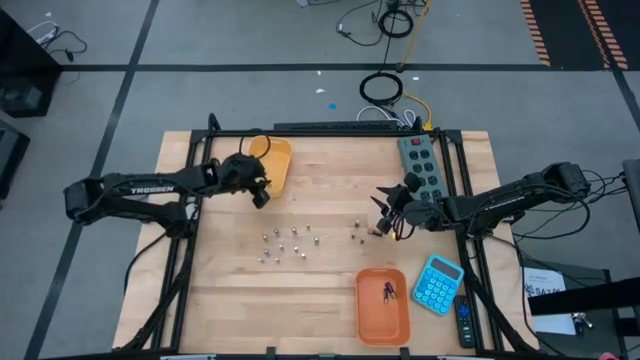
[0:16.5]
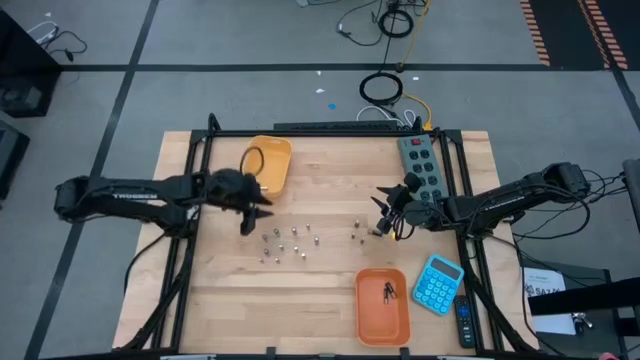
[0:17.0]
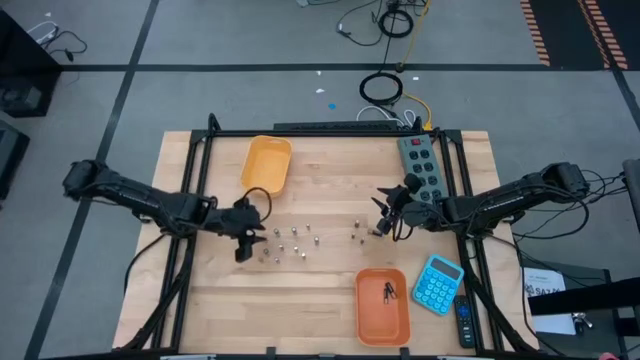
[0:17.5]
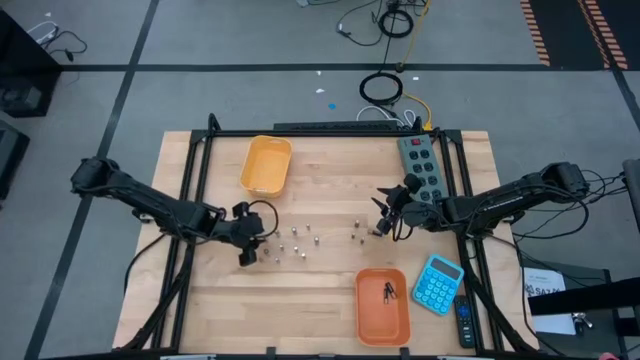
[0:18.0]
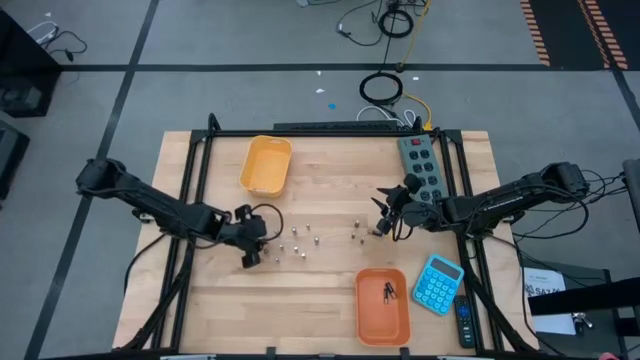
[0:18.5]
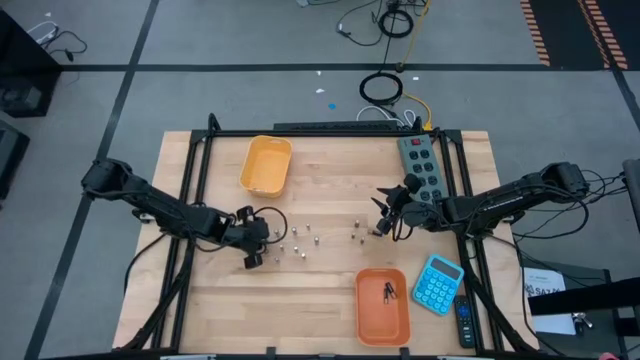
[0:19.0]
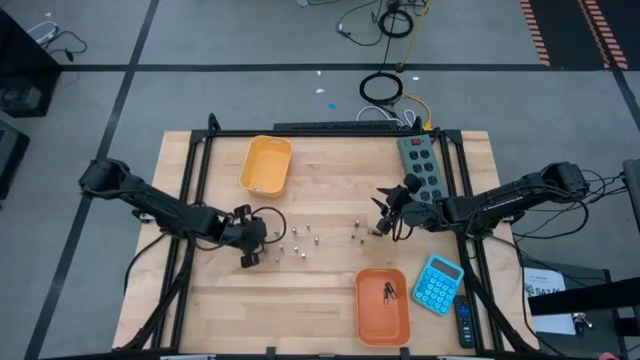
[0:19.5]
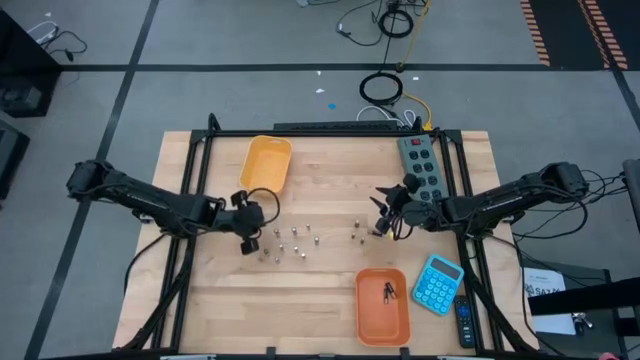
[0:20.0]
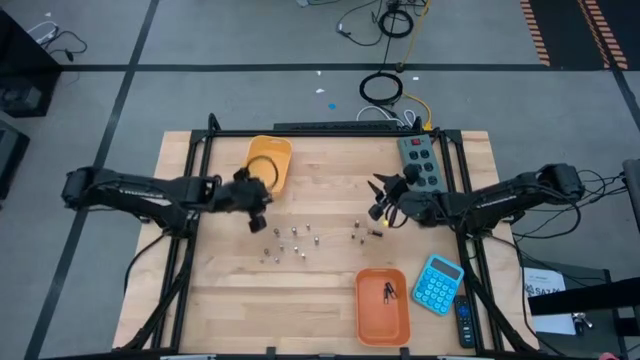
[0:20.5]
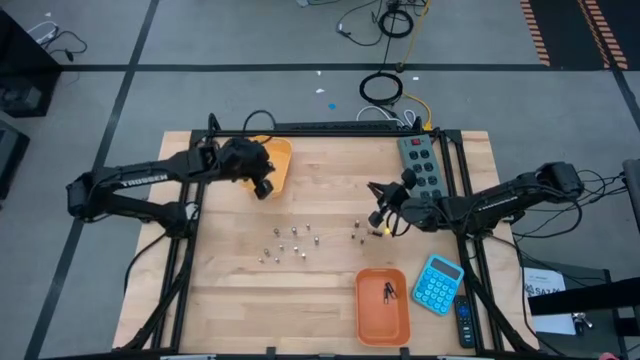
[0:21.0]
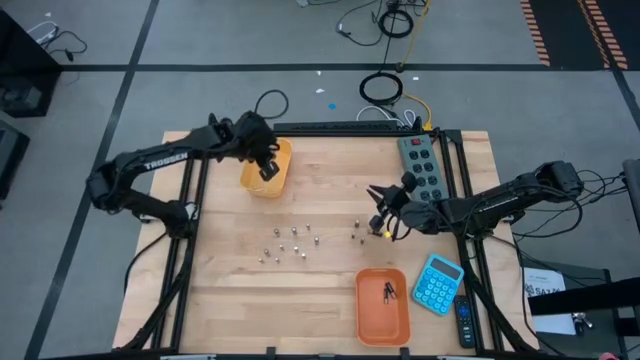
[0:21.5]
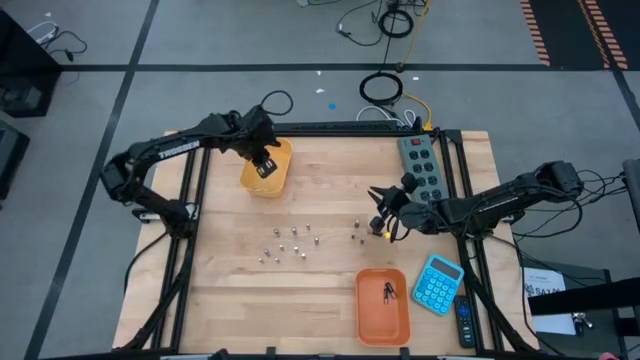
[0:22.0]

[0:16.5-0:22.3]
Task: Sort batteries
Put the silver battery into the yellow bin

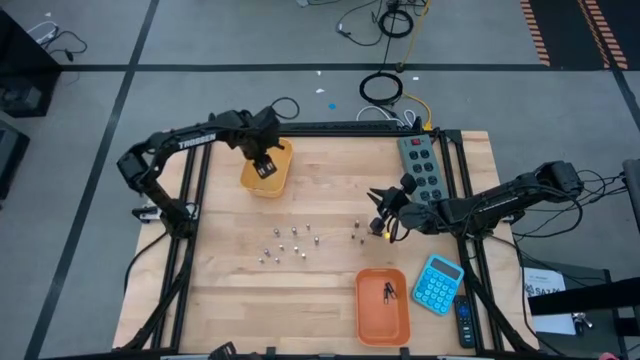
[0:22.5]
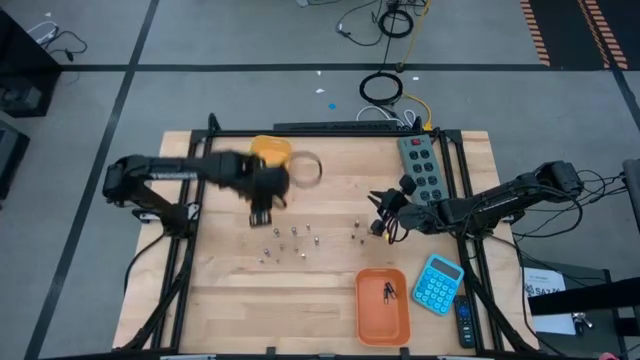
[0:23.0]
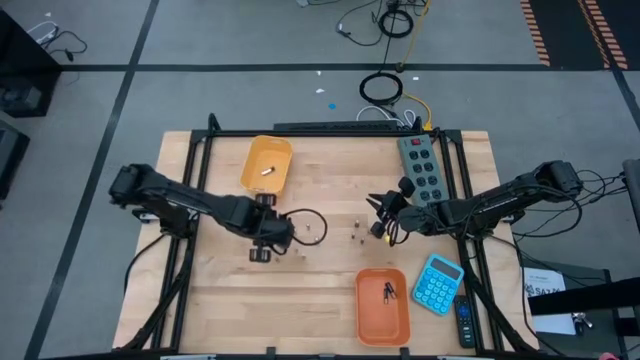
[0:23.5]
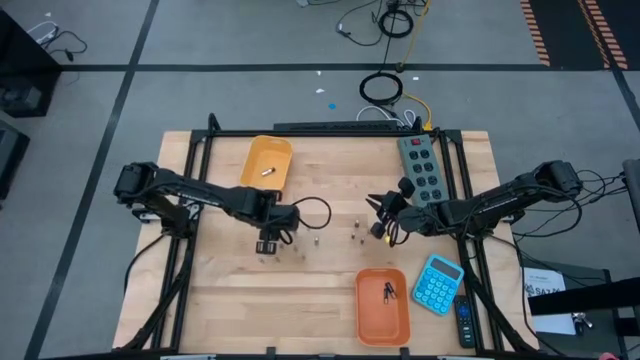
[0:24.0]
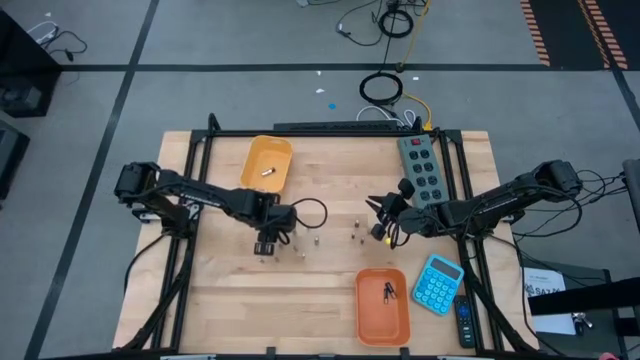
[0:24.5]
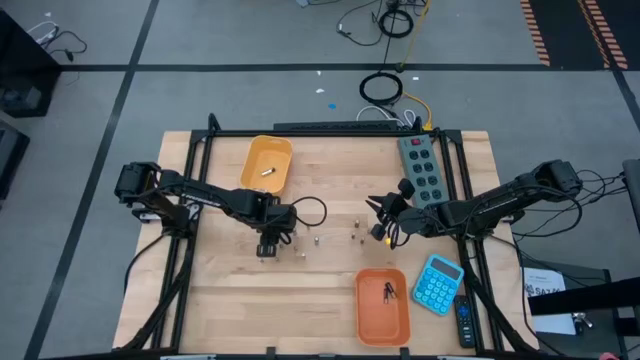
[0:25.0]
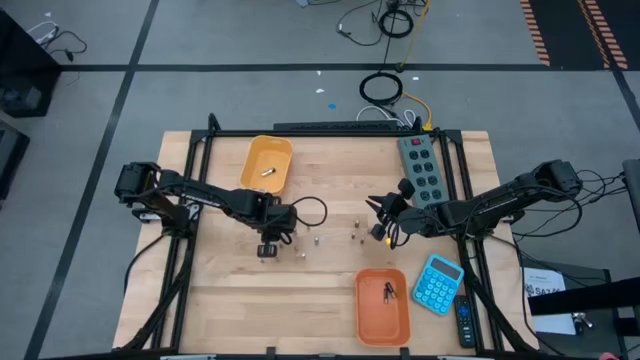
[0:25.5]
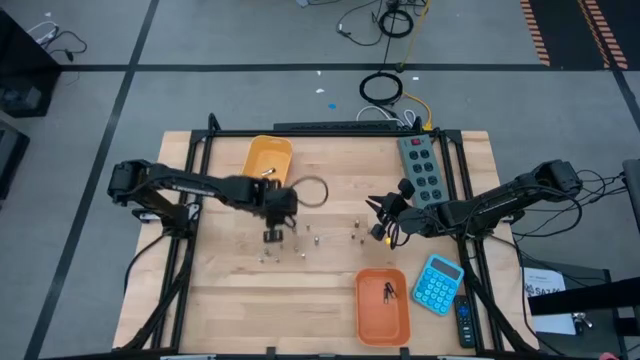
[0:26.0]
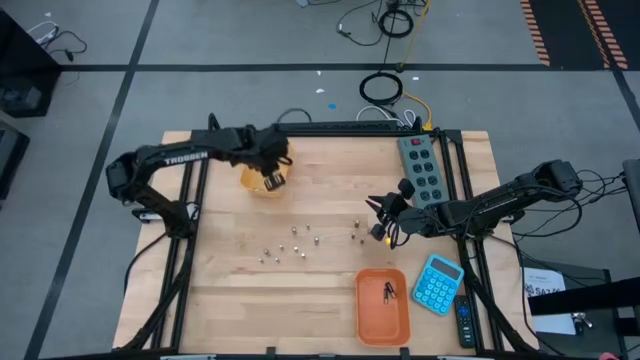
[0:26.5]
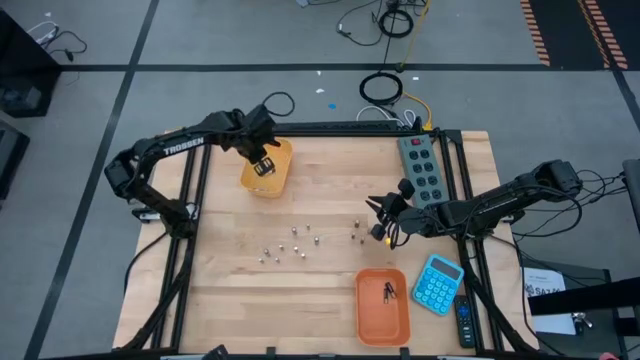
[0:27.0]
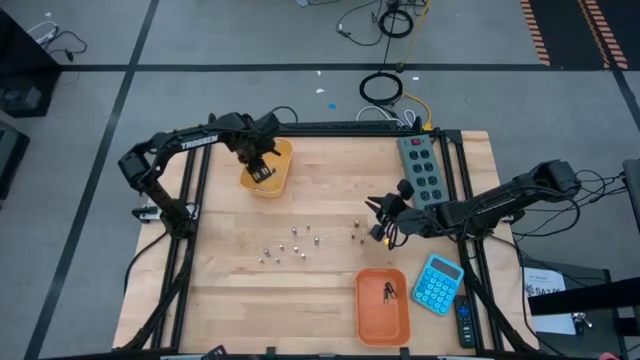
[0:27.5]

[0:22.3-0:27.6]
Put the silver battery into the yellow bin

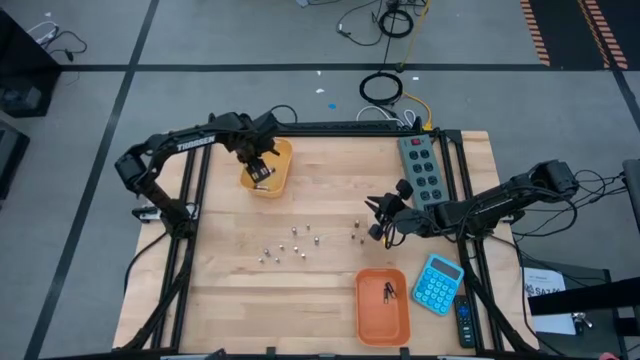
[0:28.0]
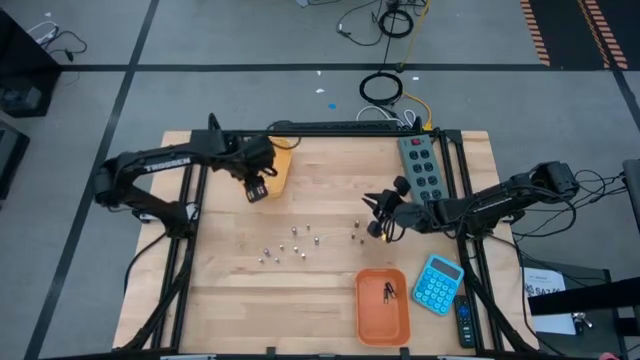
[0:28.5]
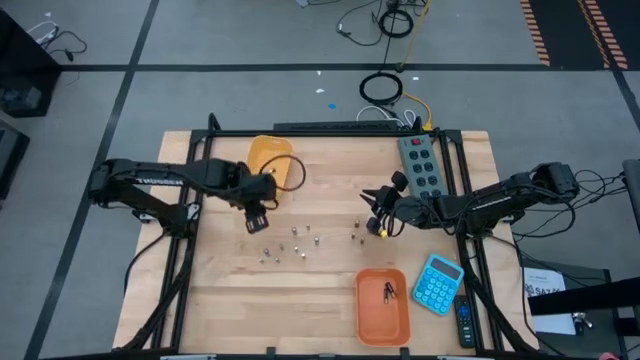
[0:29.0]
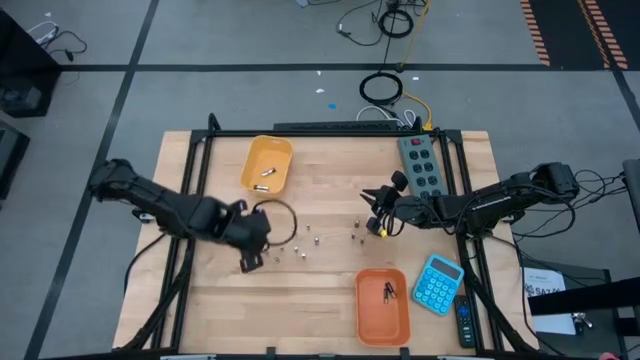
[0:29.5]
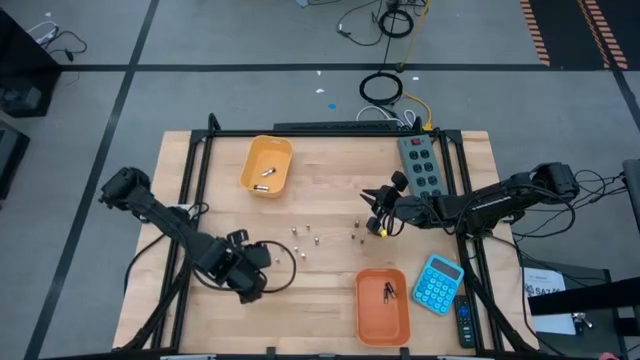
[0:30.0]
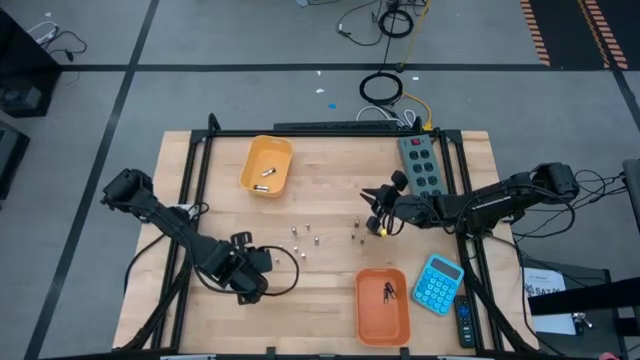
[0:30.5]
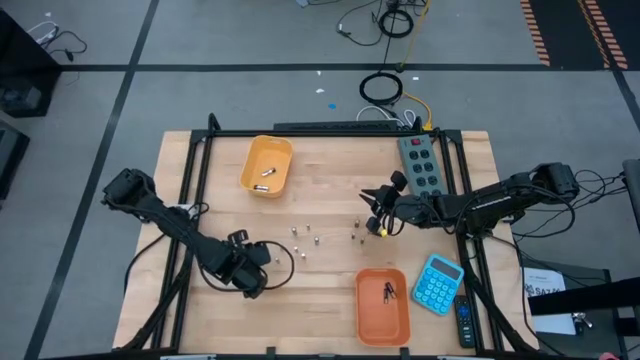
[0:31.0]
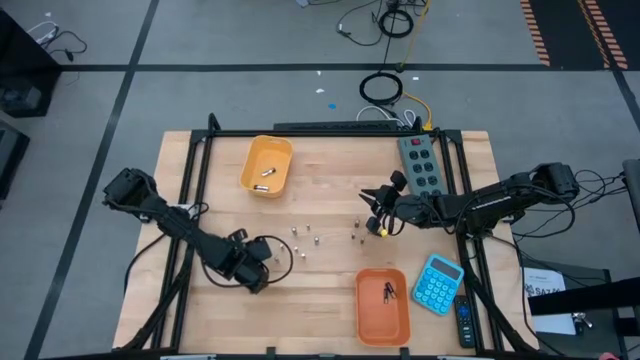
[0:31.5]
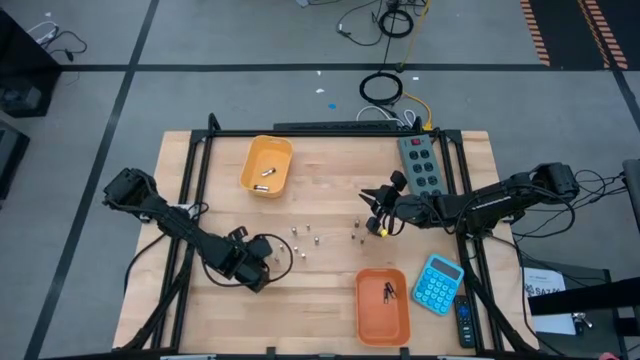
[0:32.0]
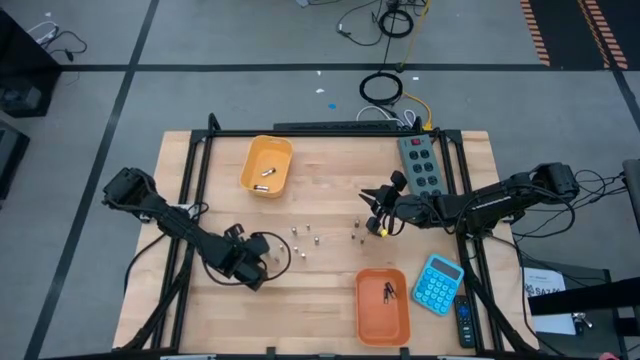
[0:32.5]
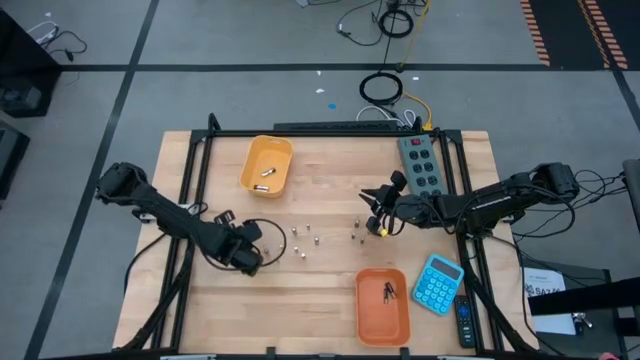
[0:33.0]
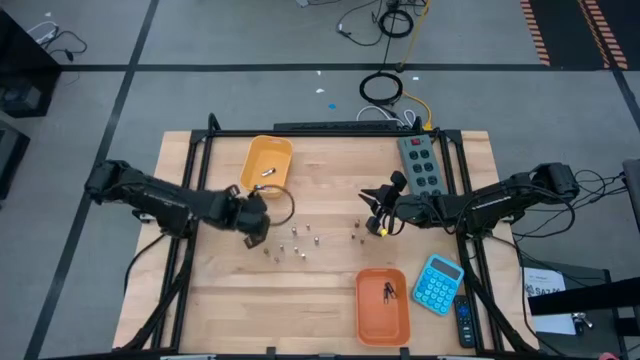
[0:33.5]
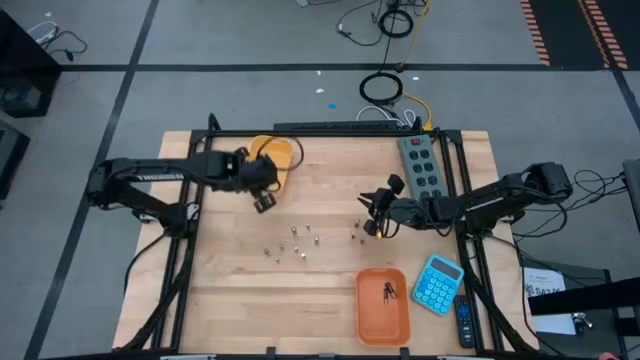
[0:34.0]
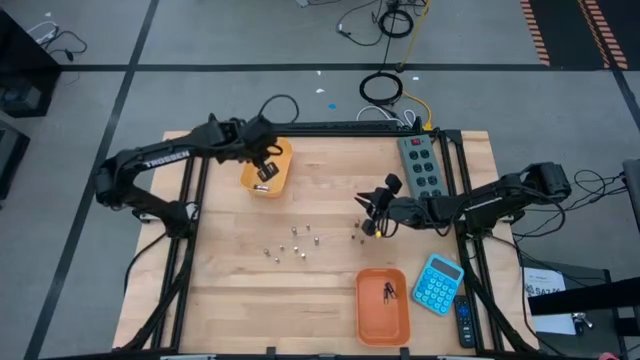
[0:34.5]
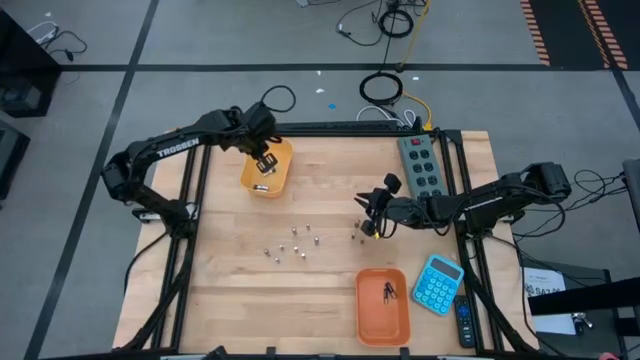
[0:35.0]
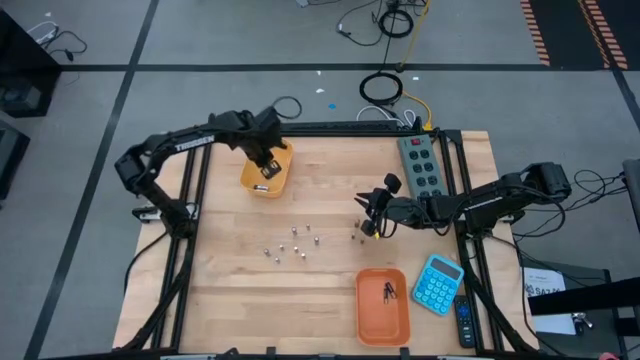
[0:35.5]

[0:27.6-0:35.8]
Put the silver battery into the yellow bin
